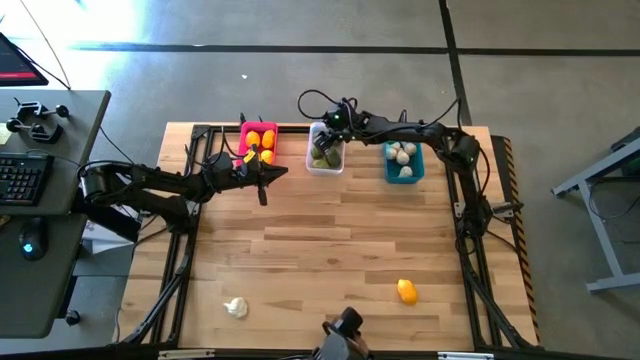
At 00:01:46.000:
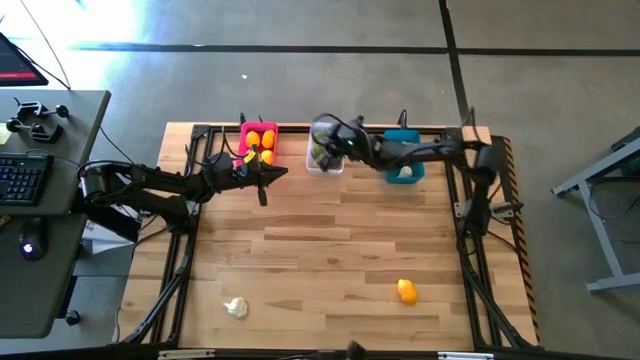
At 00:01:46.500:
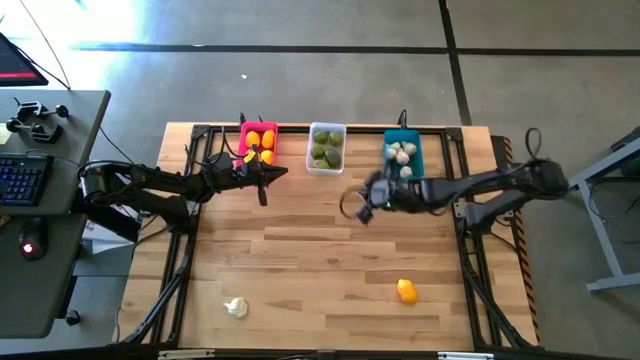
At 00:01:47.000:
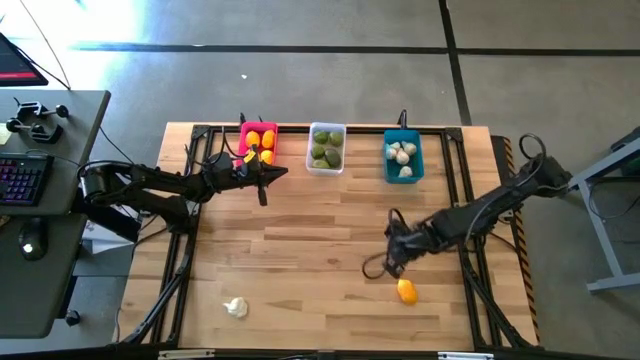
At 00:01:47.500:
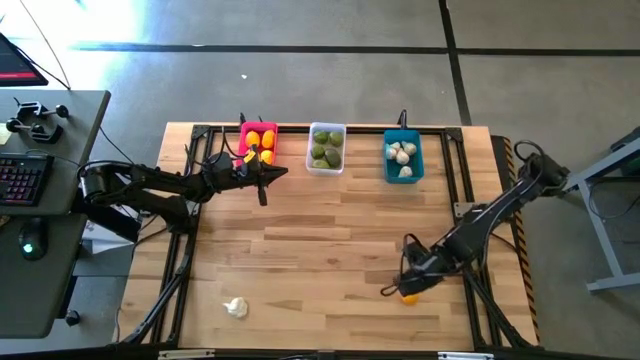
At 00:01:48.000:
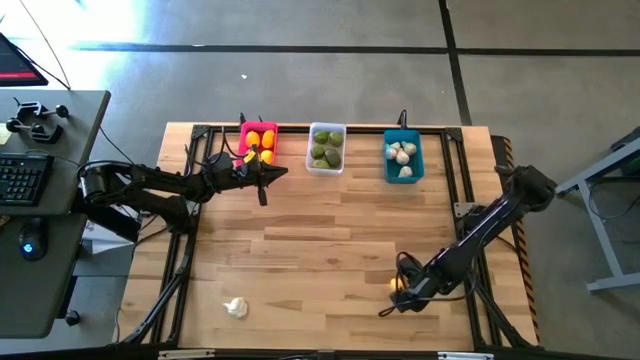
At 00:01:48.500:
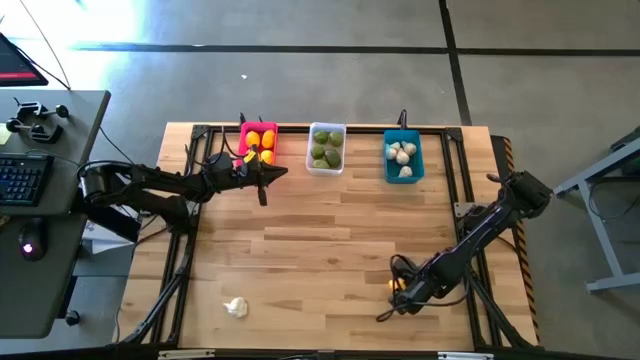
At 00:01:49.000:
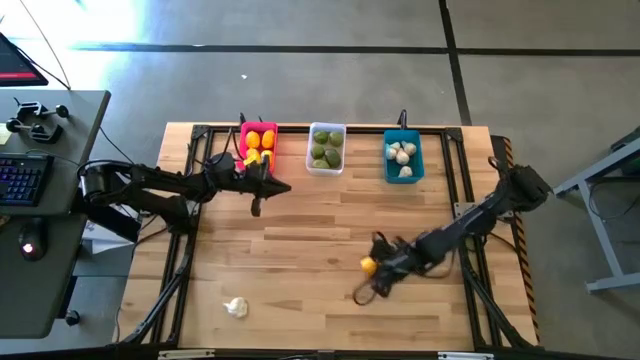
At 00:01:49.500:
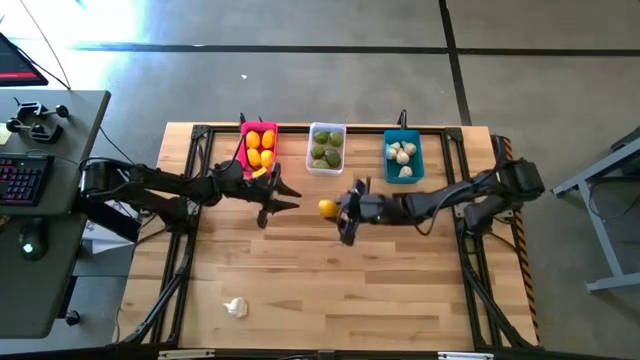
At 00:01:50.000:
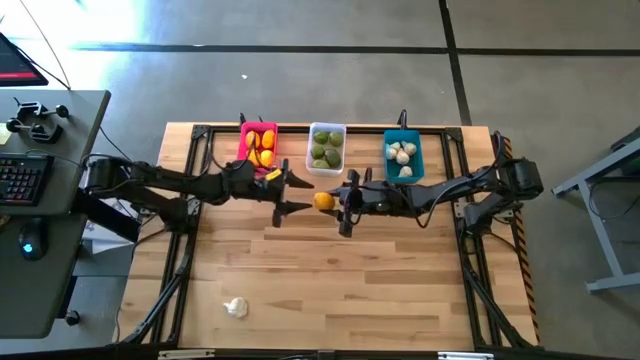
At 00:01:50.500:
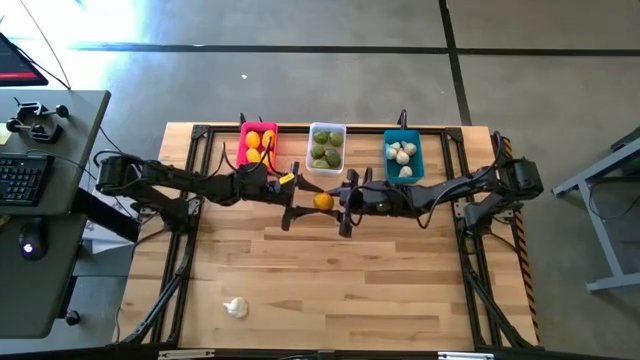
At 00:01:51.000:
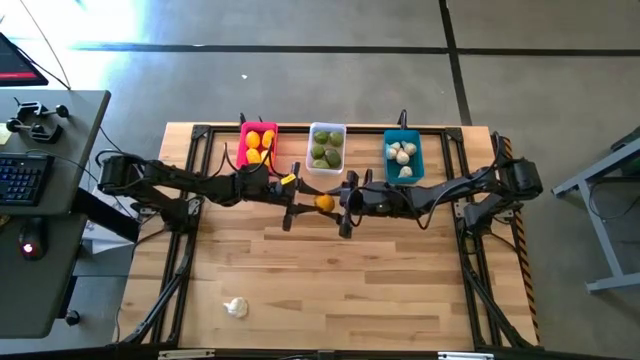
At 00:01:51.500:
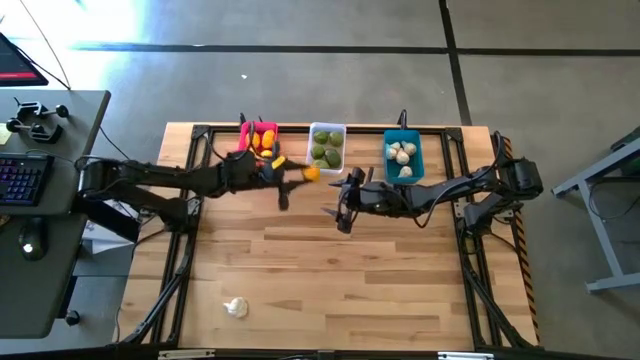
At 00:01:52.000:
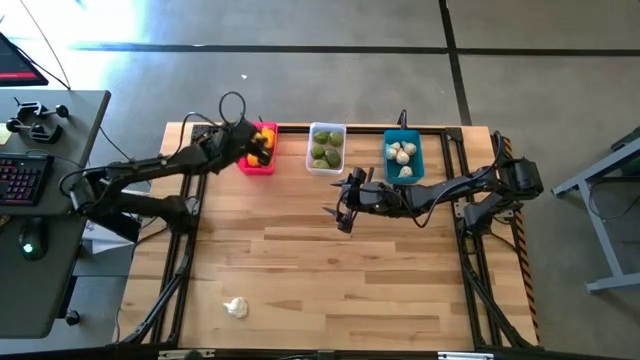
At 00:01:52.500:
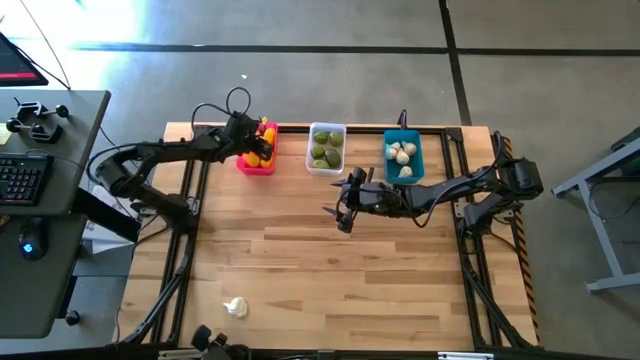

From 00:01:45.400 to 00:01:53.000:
Task: Sort produce into baskets
Put the lemon into the pink bin

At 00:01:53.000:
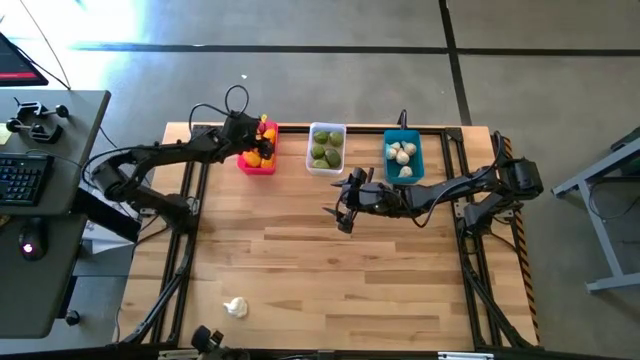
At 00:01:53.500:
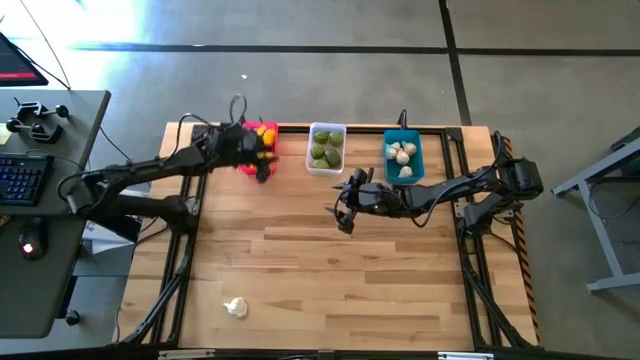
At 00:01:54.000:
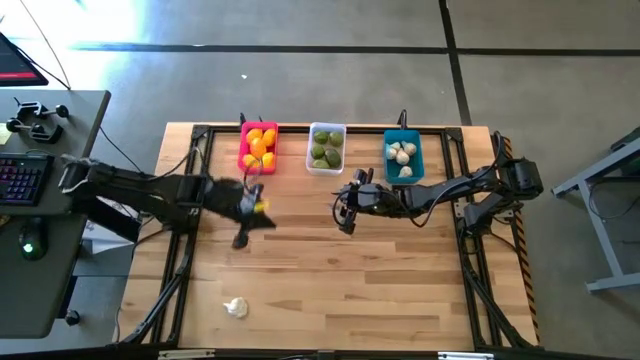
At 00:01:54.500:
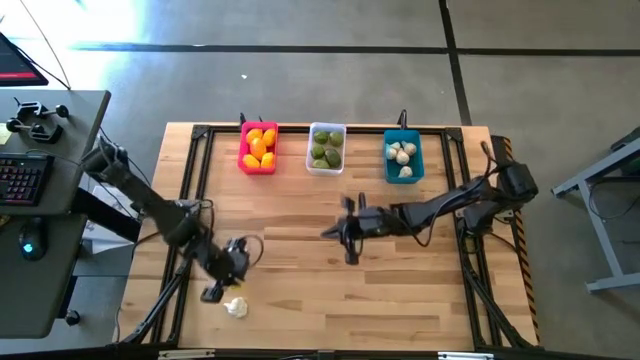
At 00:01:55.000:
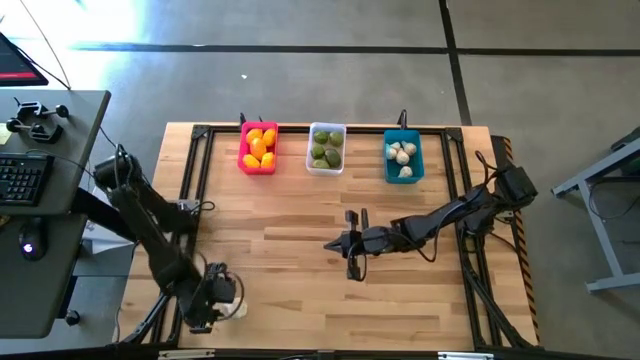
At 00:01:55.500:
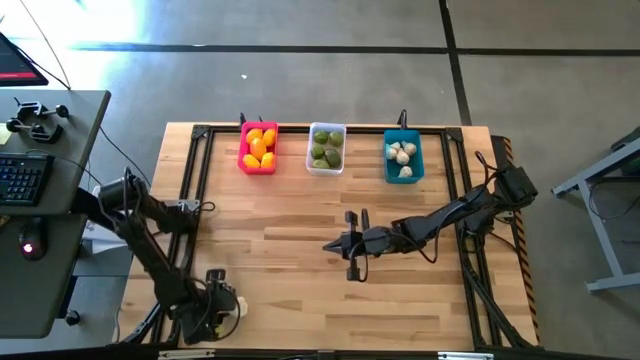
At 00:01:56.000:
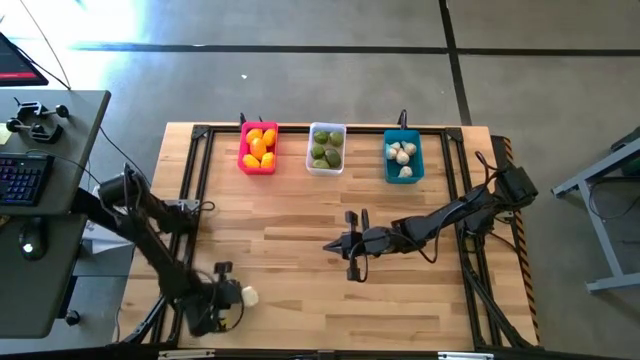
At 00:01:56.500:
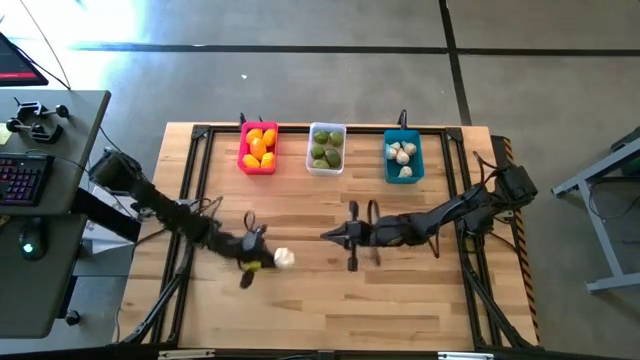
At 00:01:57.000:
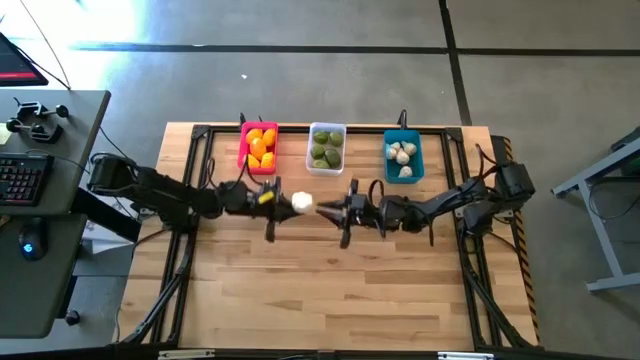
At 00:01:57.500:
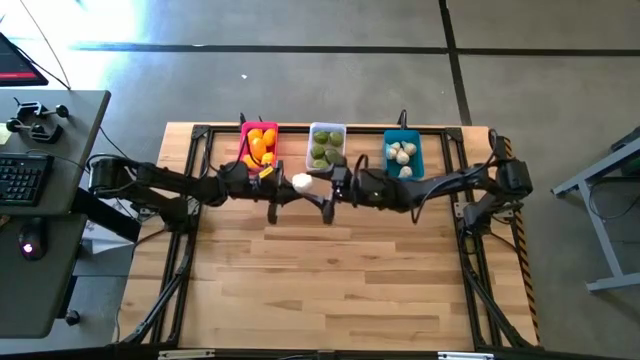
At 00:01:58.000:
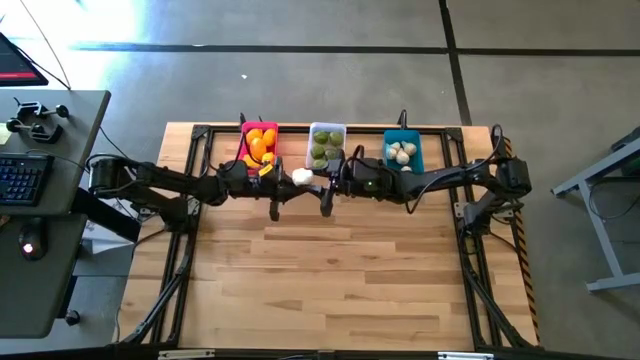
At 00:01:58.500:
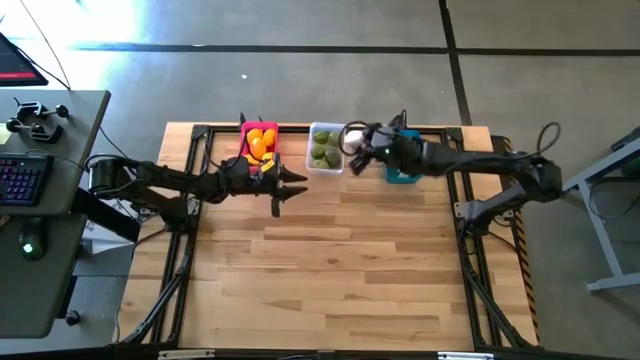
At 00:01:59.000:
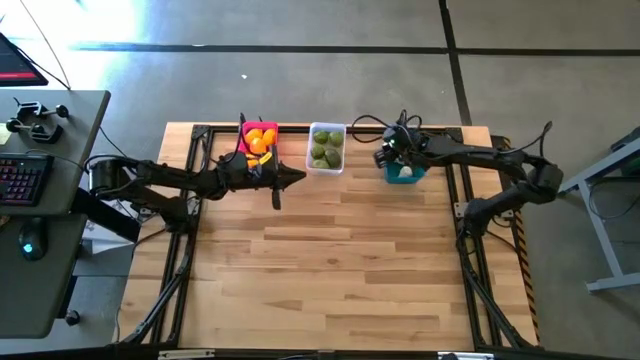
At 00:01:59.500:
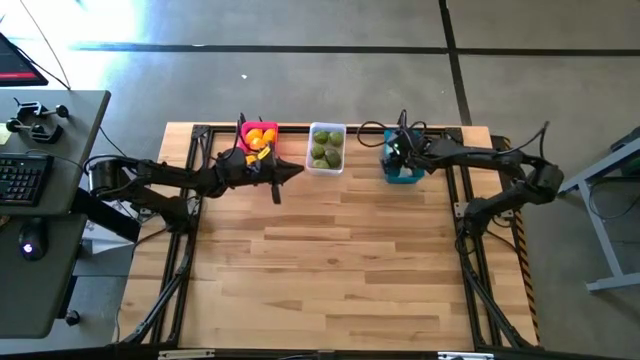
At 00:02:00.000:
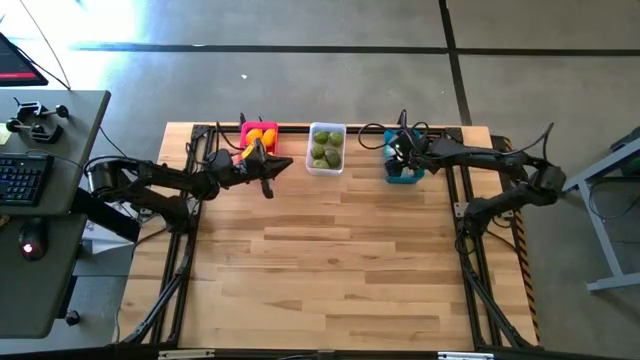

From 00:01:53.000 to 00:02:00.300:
Put the white garlic into the blue bin

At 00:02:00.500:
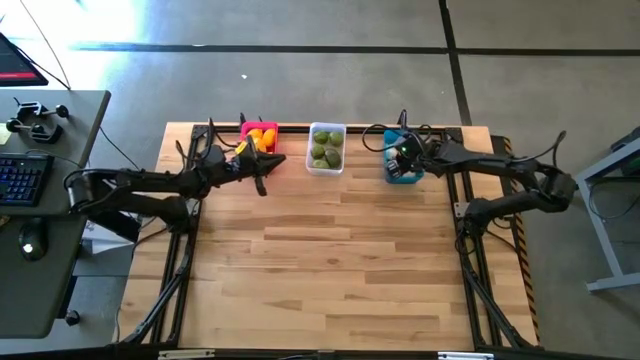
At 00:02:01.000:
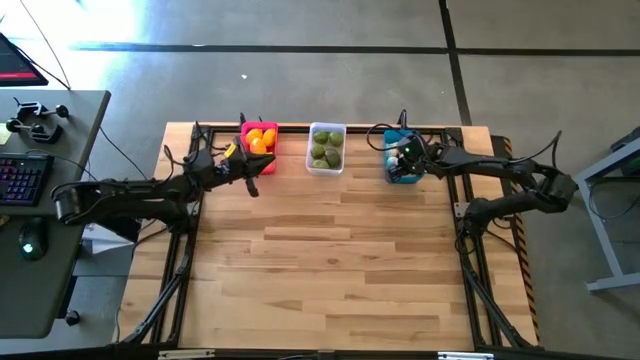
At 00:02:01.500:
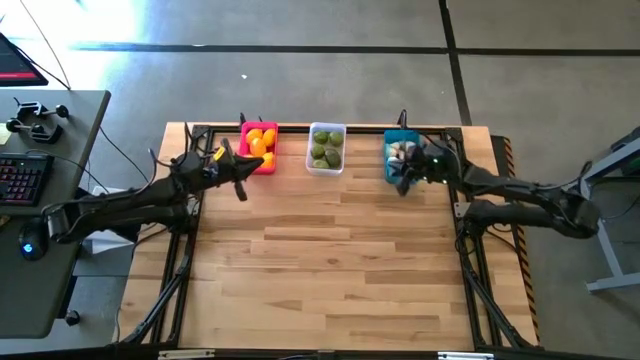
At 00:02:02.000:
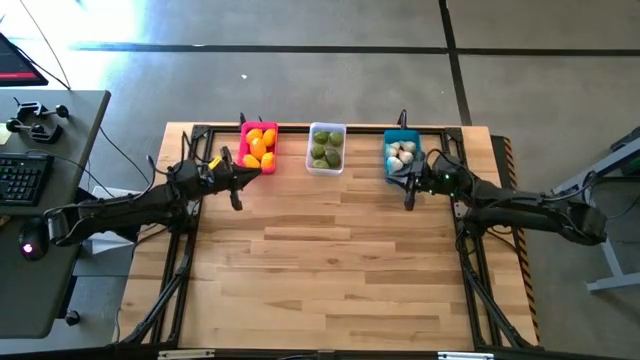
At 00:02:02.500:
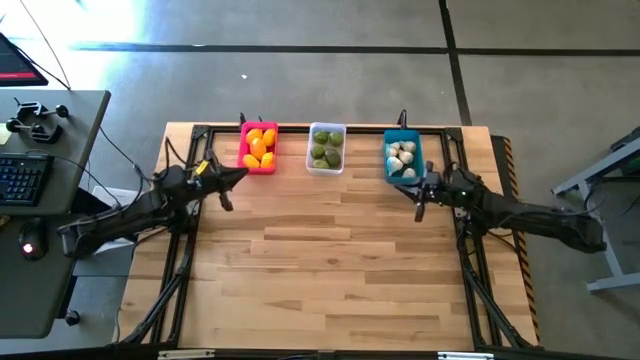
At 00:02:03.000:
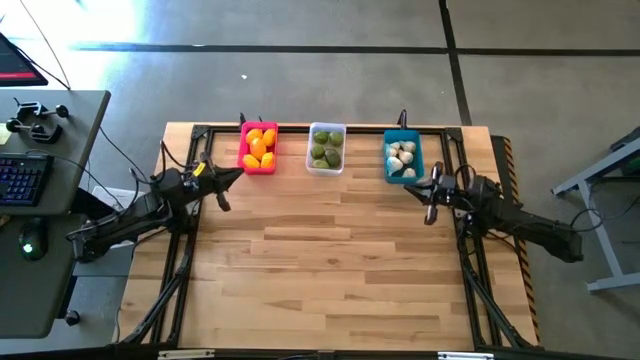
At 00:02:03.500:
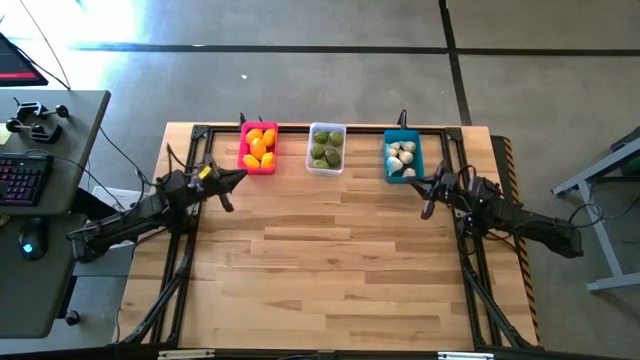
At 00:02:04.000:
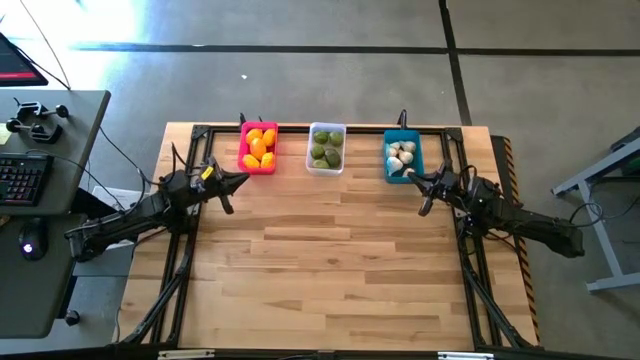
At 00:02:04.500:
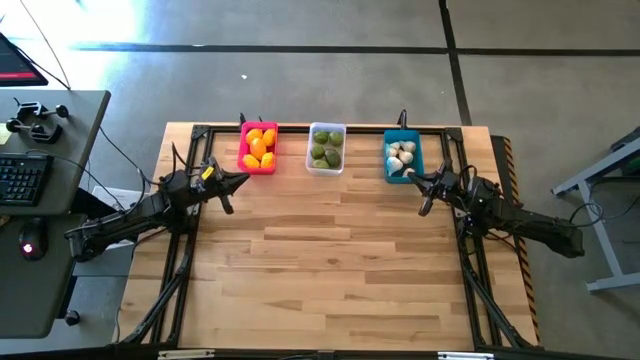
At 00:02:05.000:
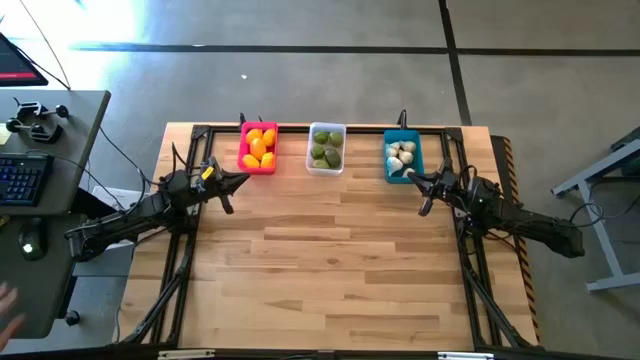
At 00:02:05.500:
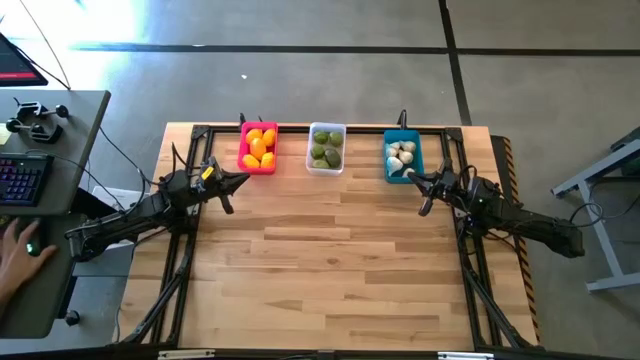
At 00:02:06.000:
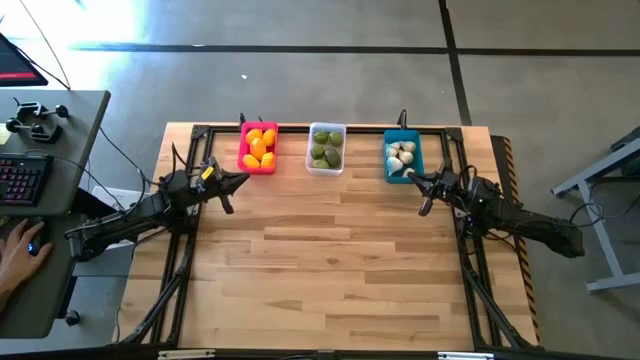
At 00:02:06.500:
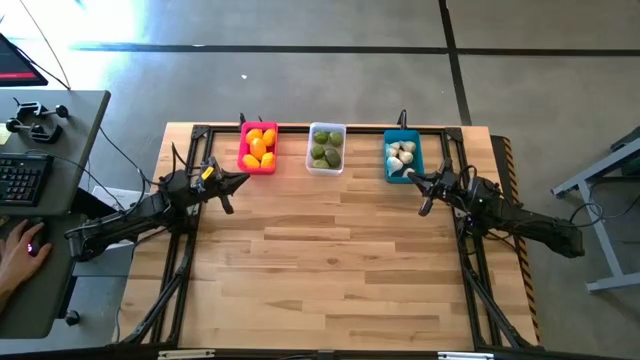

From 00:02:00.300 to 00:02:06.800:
Return to Home Position

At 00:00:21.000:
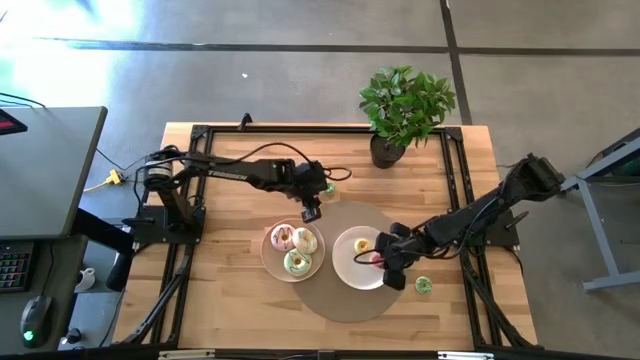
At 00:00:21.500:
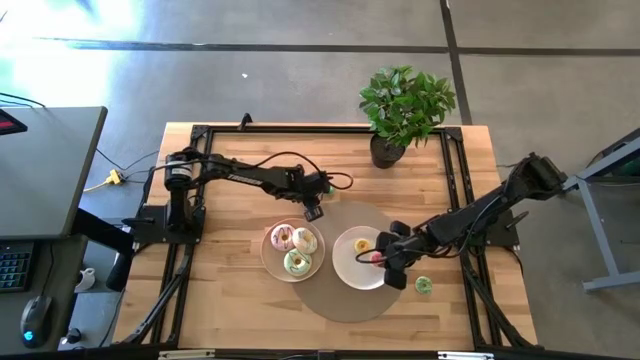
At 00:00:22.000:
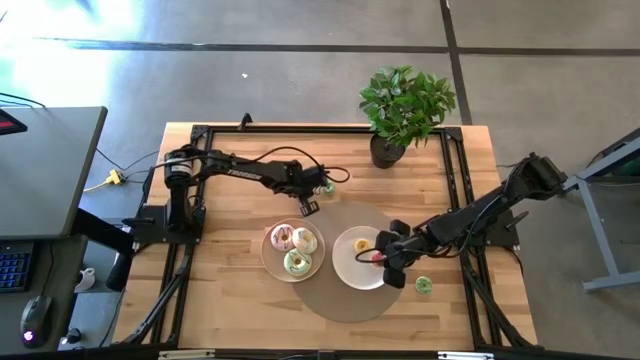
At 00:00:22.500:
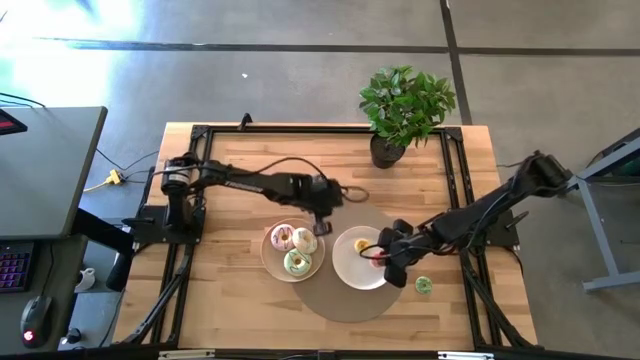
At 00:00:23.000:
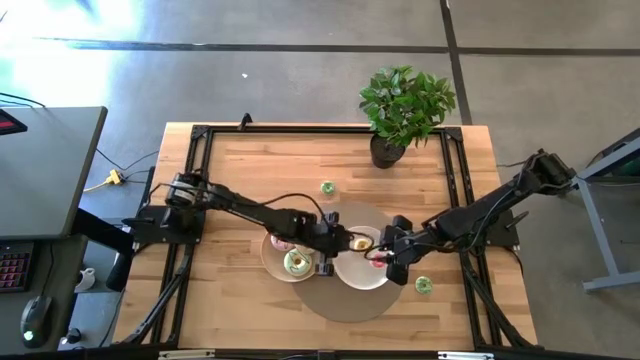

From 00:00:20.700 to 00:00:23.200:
Task: Pick & Place donuts
Put the small pink donut on the white plate
